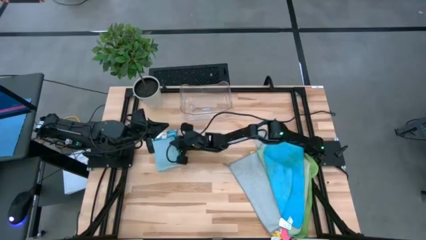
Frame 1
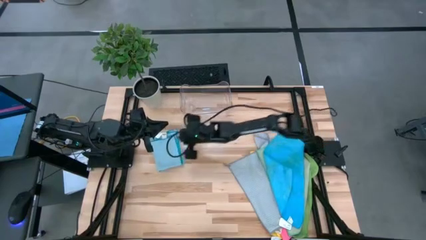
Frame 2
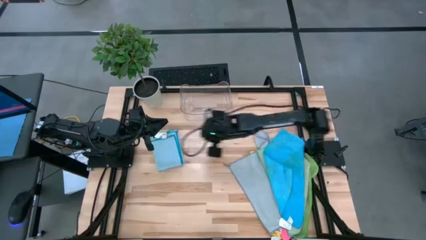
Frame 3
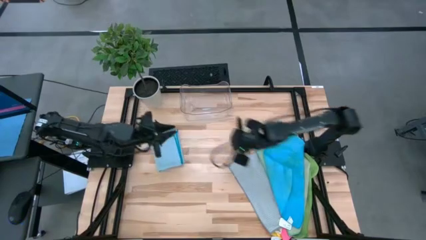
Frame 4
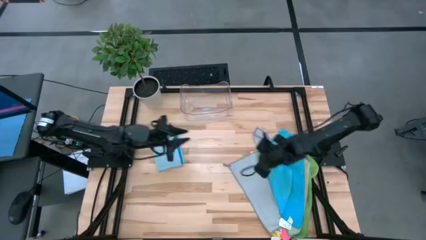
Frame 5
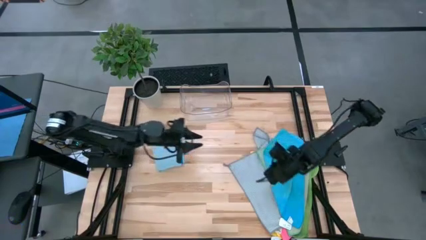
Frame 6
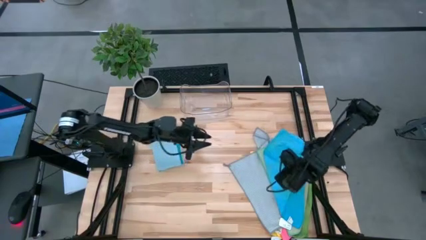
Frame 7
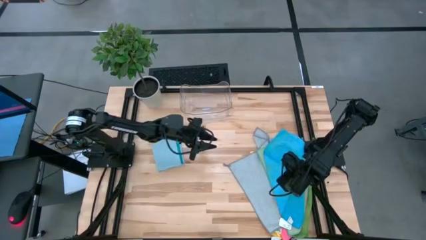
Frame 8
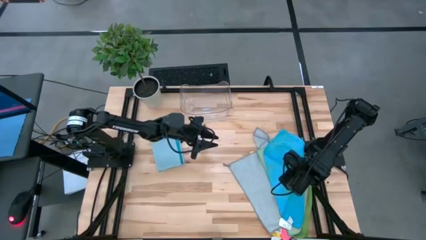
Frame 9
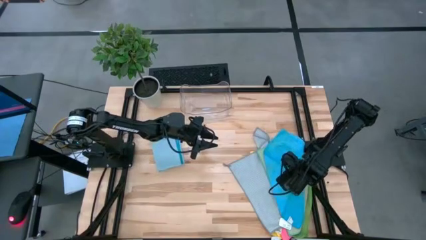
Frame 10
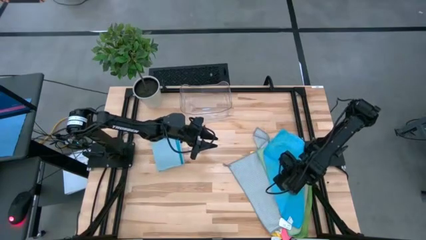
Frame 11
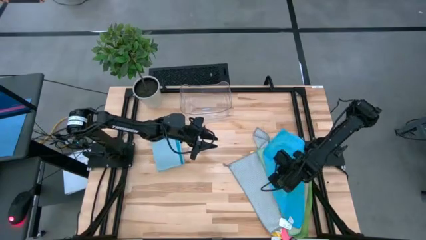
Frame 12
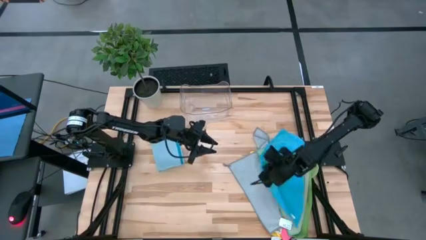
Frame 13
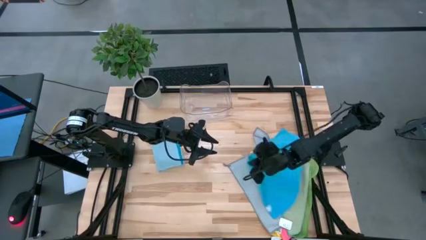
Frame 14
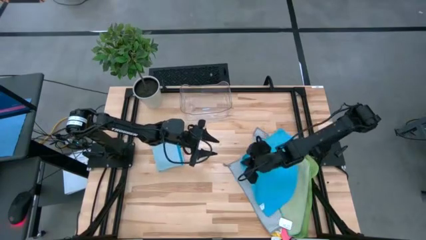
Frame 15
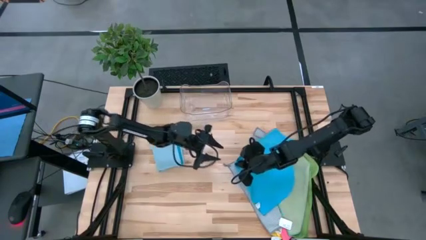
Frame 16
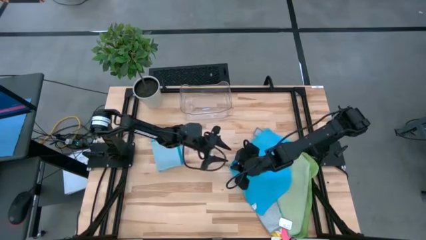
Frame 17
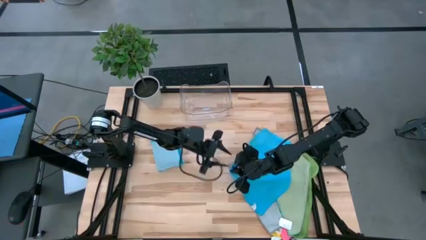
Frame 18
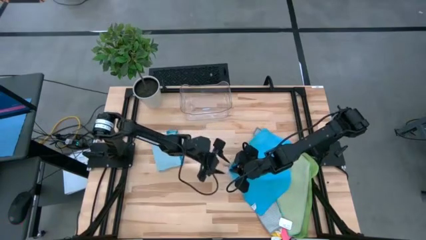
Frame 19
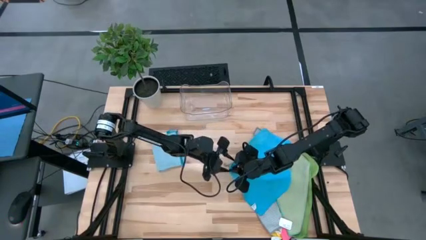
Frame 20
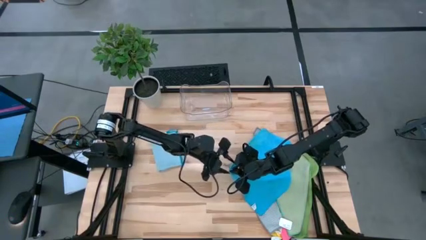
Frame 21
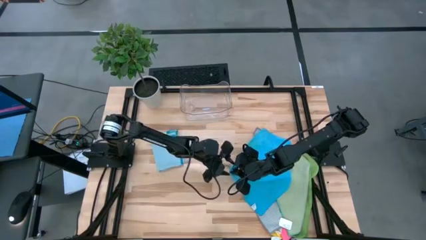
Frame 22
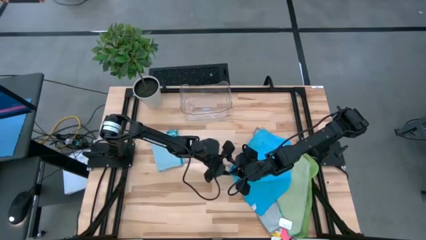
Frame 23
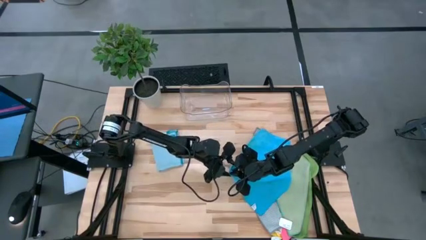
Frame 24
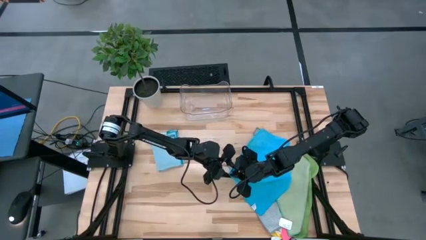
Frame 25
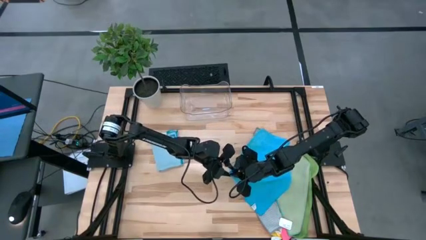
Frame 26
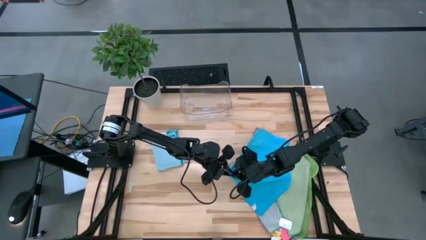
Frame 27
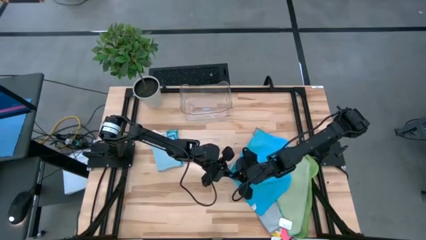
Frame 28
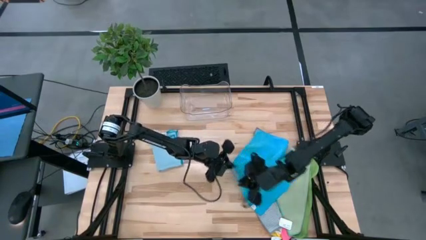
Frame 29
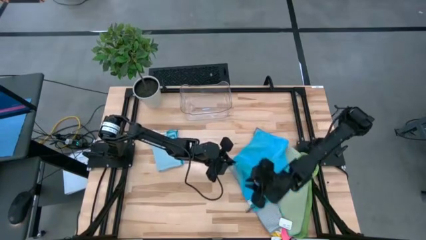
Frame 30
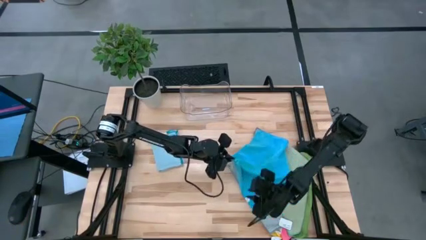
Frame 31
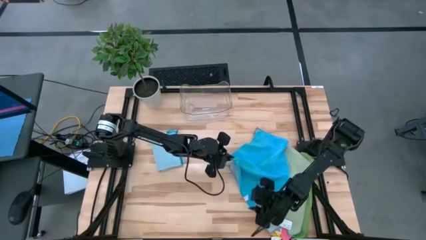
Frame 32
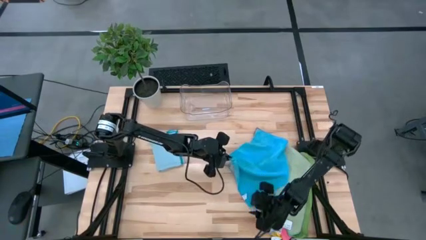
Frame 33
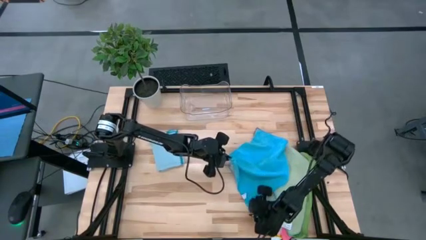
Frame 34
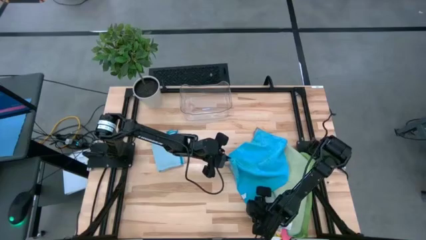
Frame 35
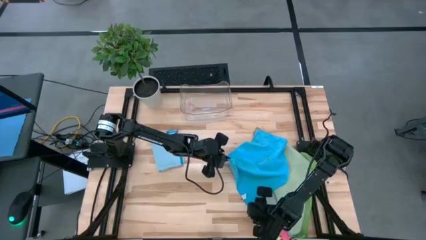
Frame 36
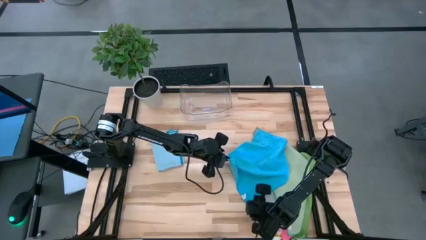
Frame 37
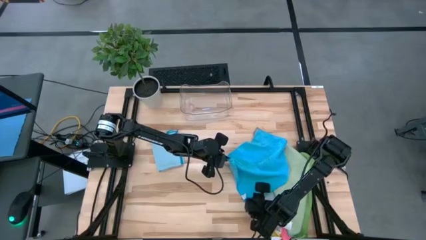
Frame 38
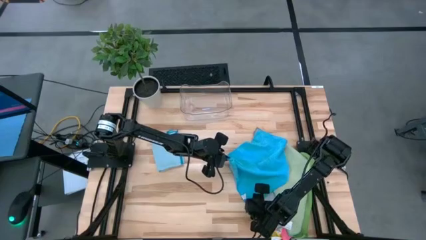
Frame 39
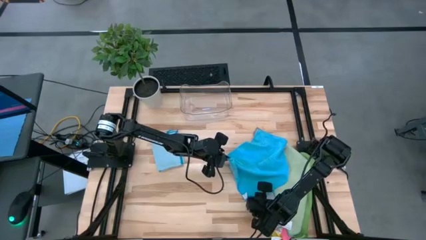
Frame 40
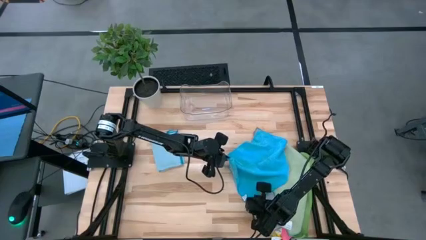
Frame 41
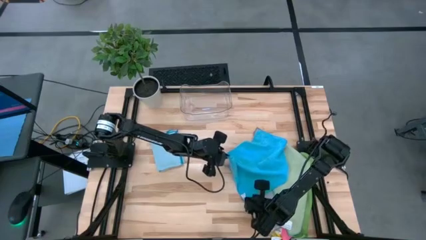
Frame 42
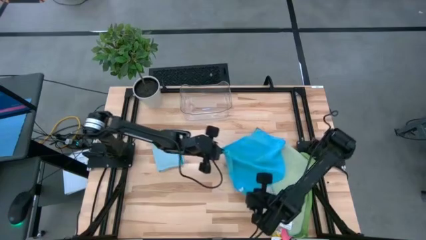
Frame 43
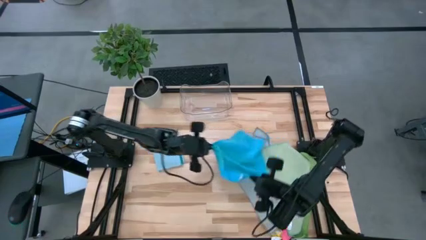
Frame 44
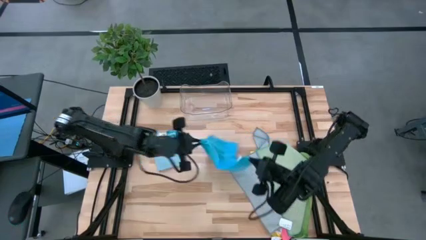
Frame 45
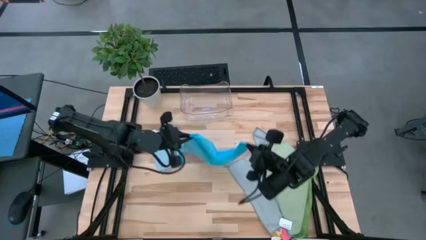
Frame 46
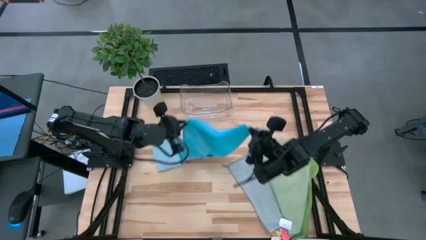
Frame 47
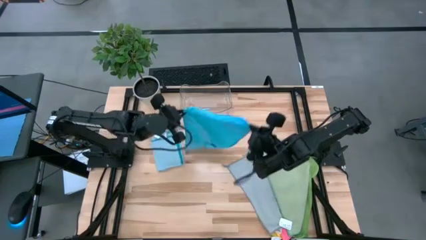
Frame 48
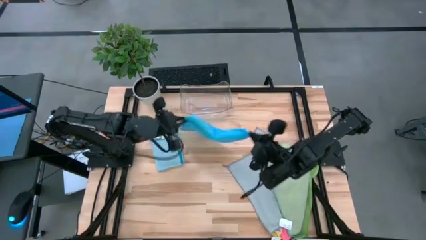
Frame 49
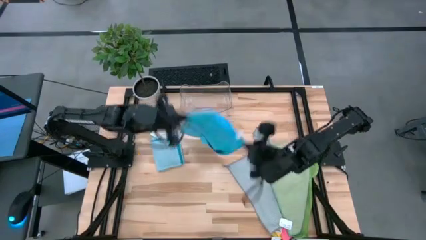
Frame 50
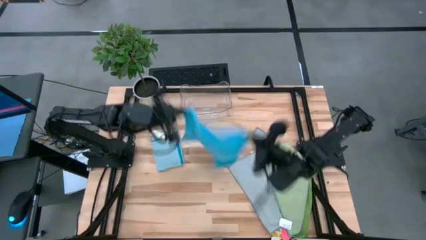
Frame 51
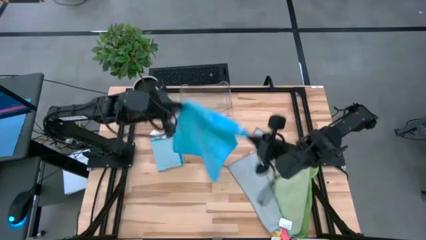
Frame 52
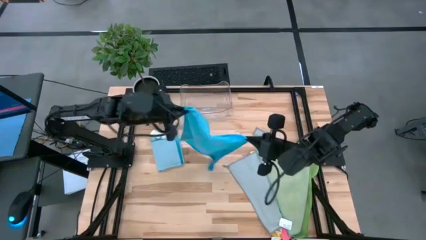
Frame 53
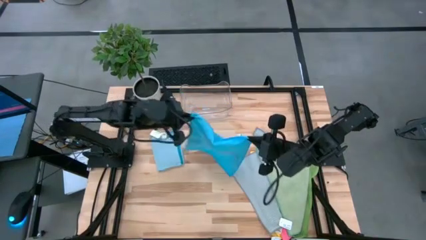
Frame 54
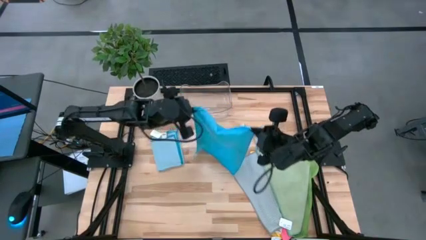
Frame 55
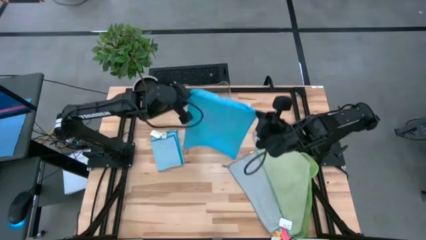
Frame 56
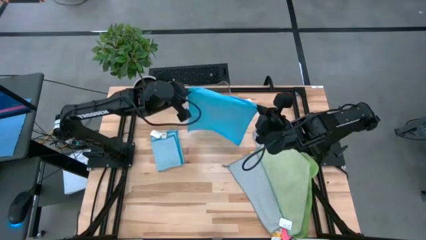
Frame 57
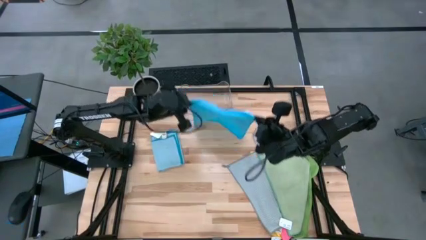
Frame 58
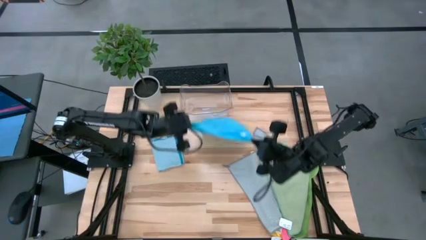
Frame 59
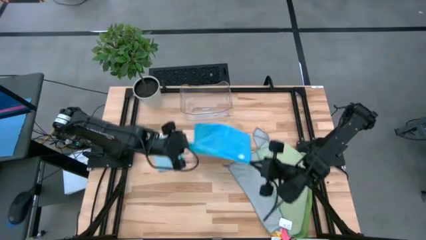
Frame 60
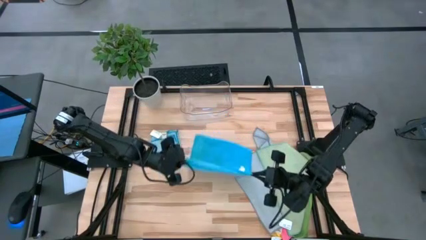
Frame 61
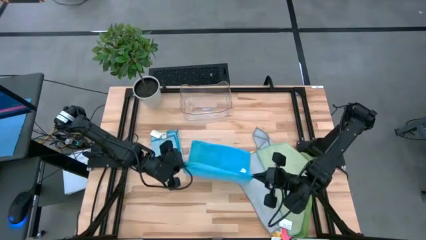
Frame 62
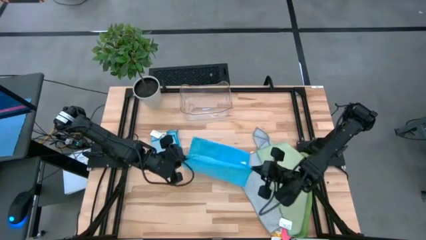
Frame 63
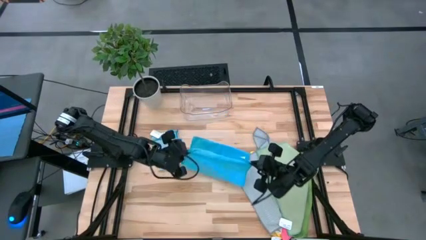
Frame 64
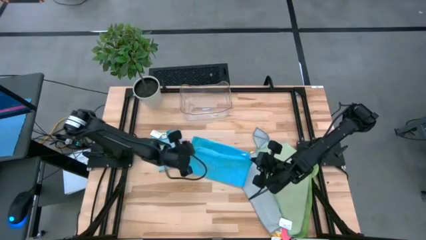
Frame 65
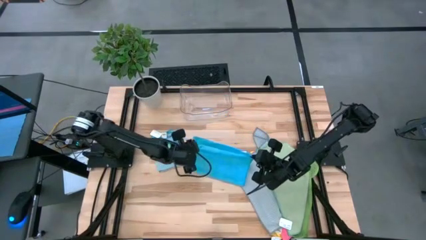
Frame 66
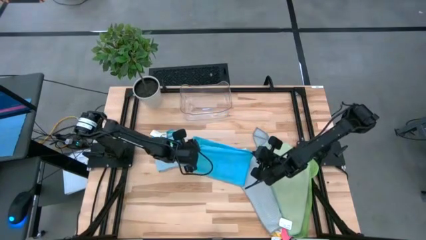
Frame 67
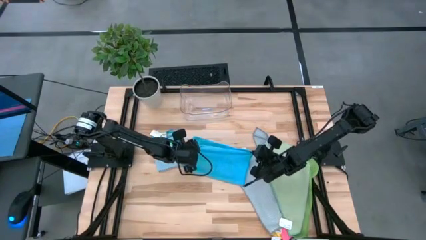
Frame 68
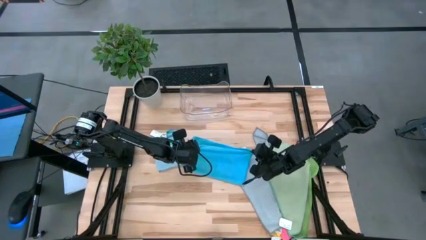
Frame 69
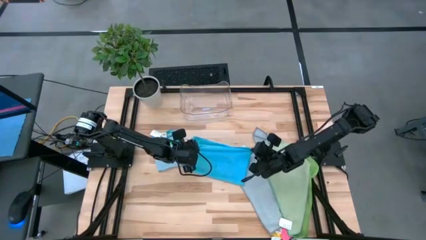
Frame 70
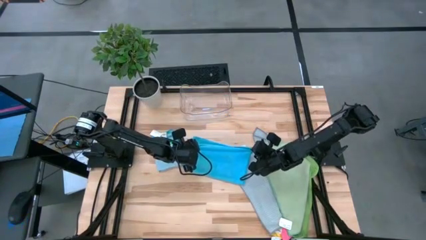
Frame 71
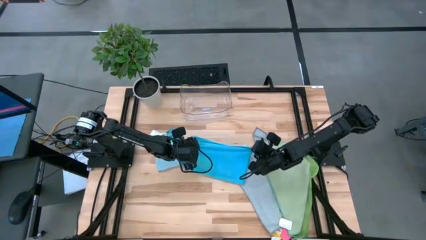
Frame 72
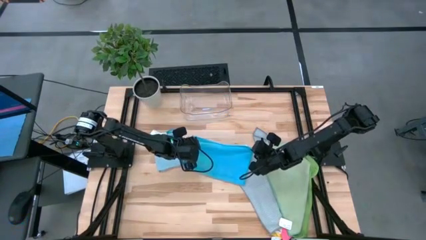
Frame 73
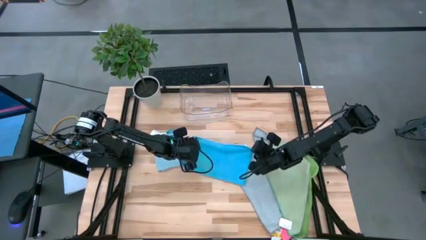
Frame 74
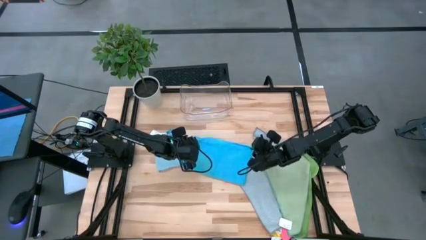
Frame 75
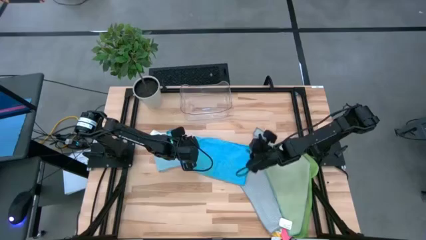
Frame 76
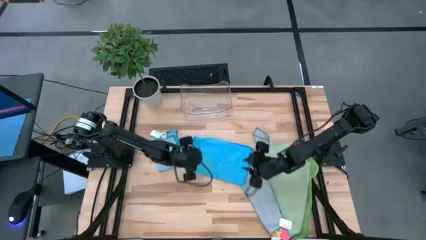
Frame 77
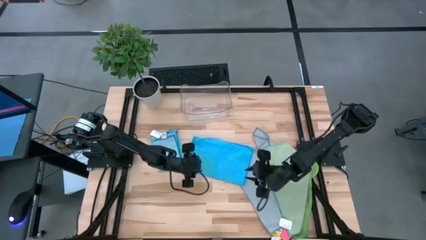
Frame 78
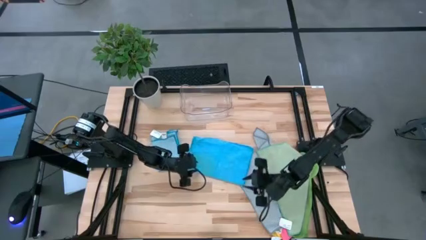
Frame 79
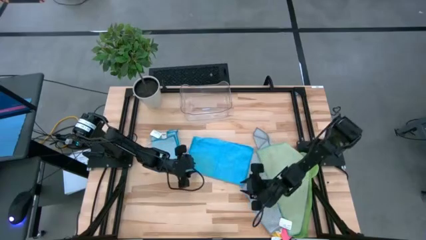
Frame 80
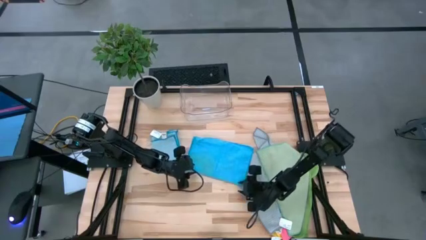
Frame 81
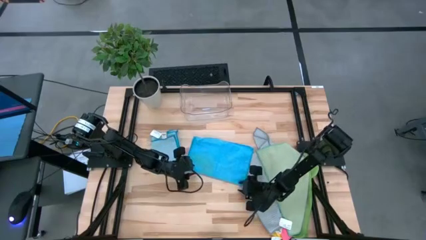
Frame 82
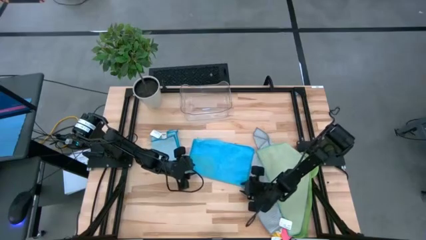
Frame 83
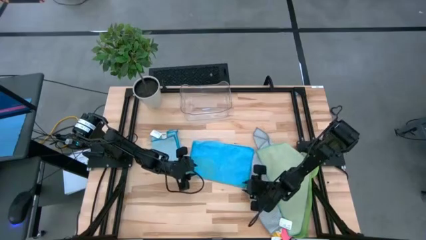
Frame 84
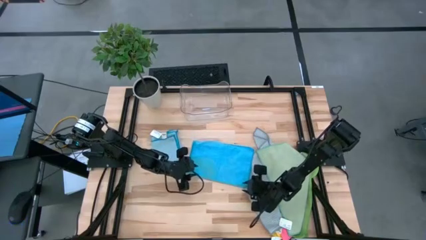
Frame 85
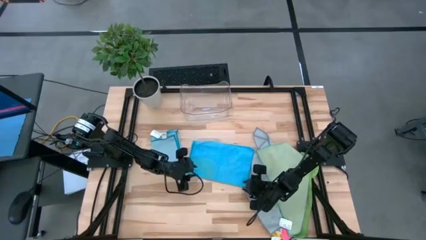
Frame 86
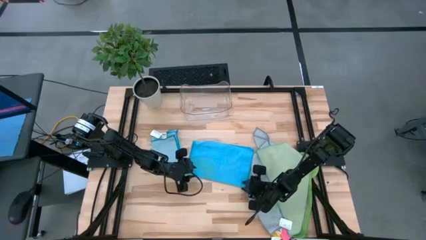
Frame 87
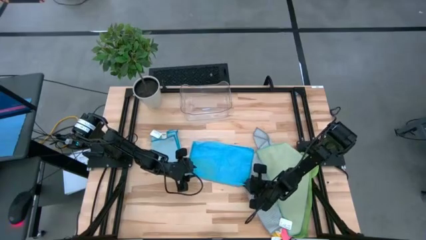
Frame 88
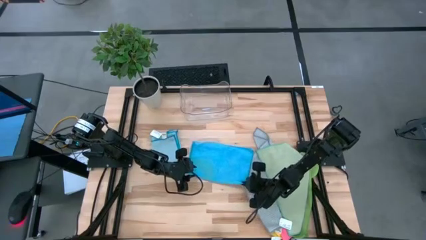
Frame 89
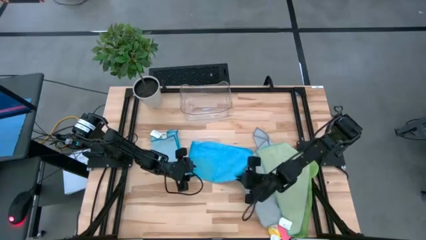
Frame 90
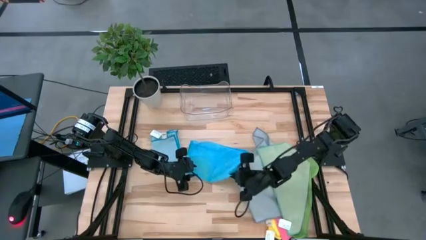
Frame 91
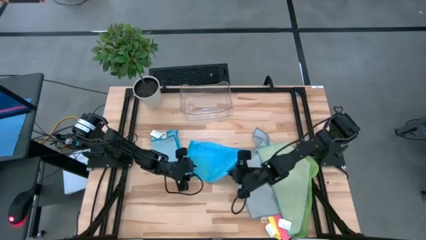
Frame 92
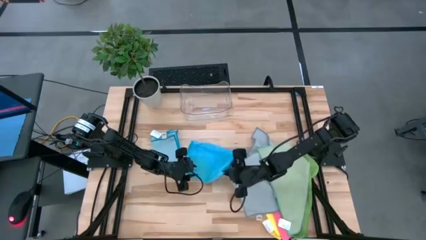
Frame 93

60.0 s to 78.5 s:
Task: Fold microfiber towels
Fold the blue microfiber cloth
